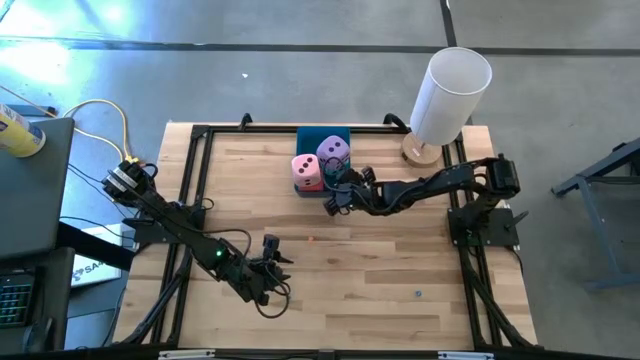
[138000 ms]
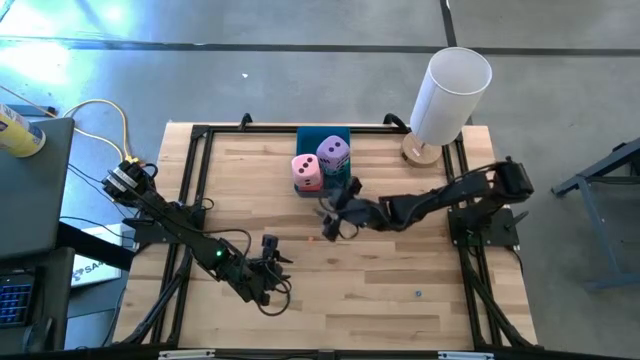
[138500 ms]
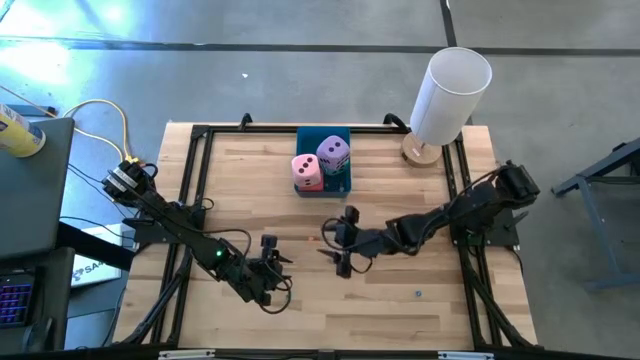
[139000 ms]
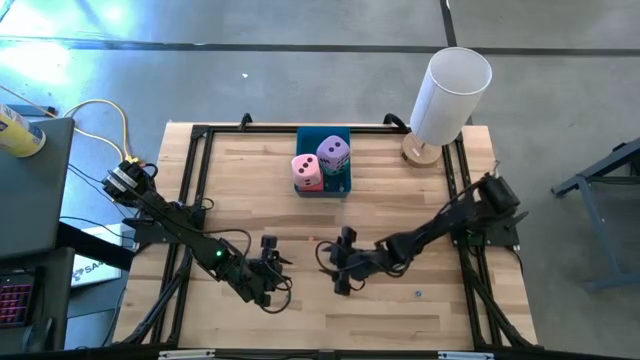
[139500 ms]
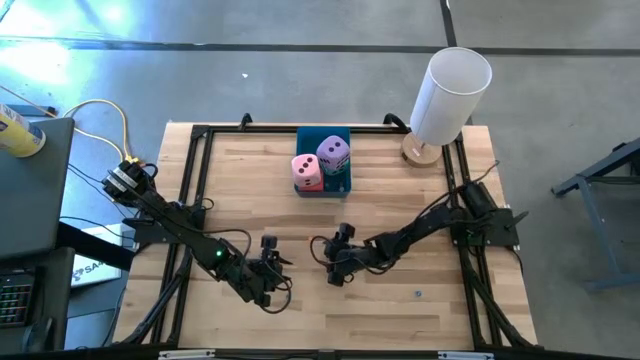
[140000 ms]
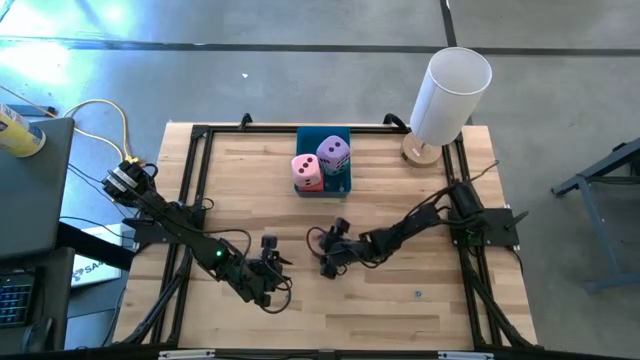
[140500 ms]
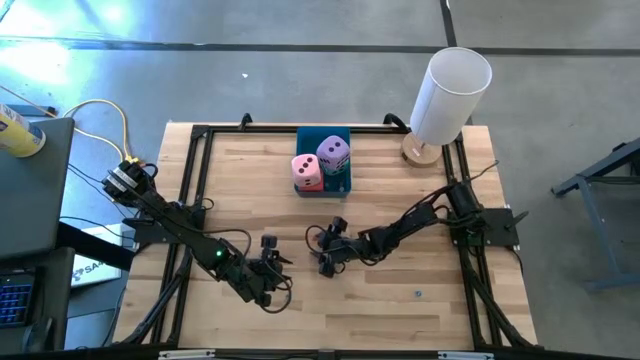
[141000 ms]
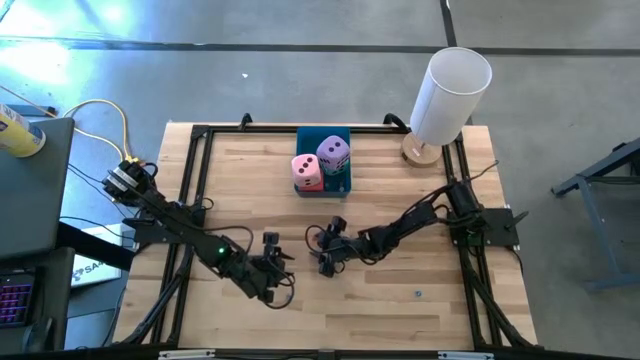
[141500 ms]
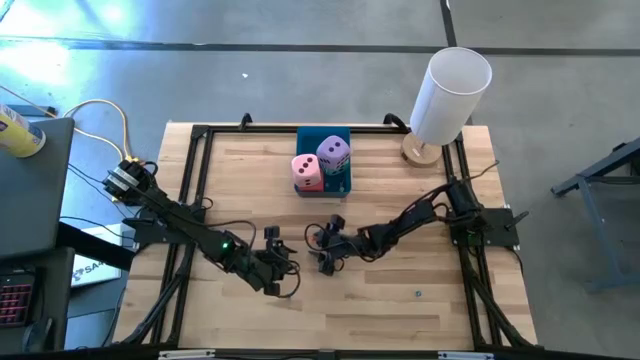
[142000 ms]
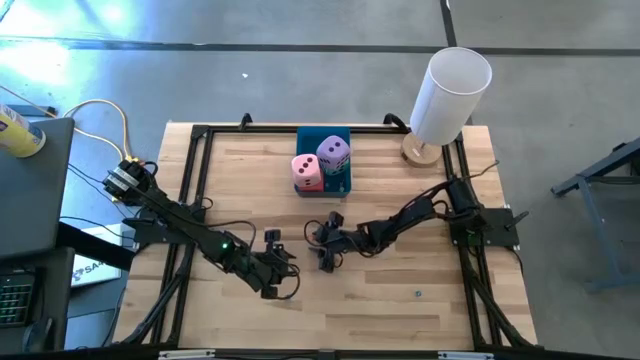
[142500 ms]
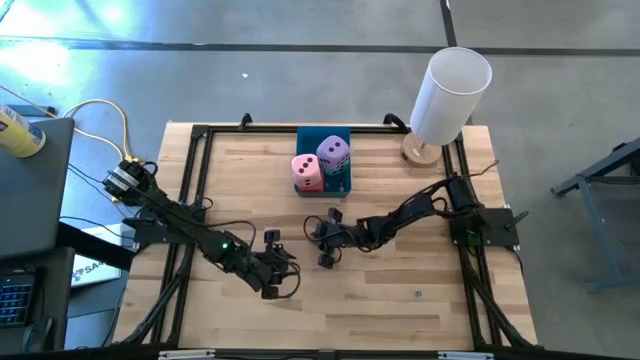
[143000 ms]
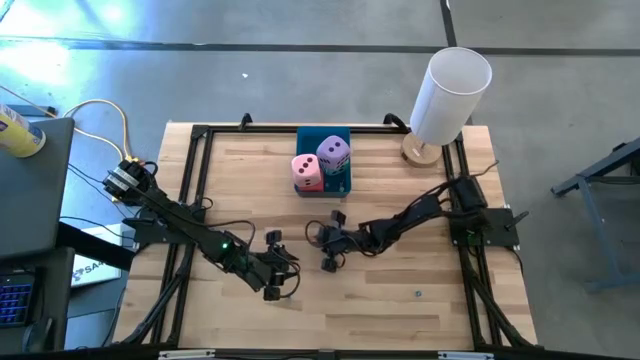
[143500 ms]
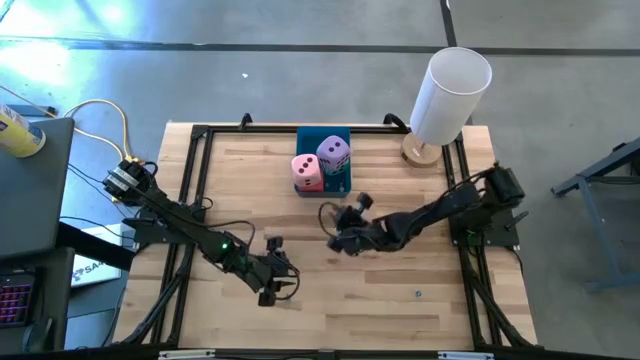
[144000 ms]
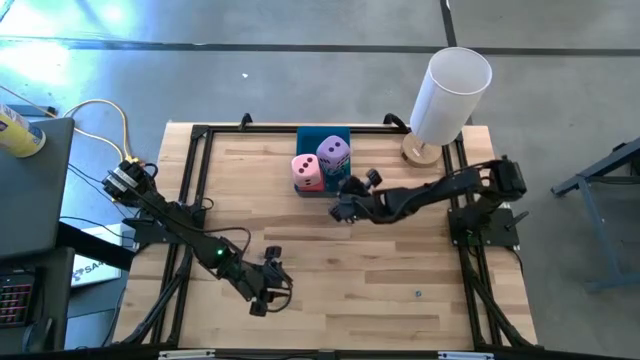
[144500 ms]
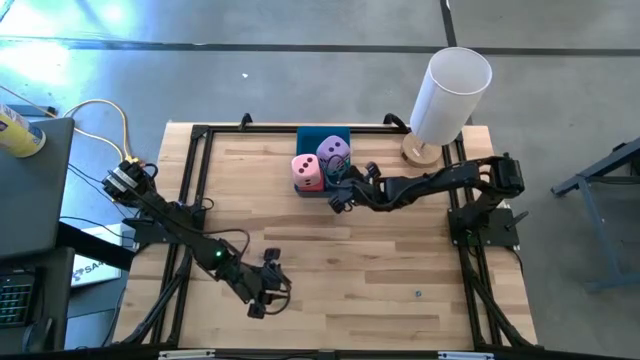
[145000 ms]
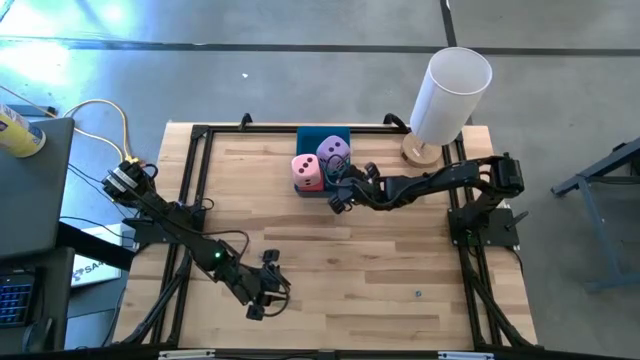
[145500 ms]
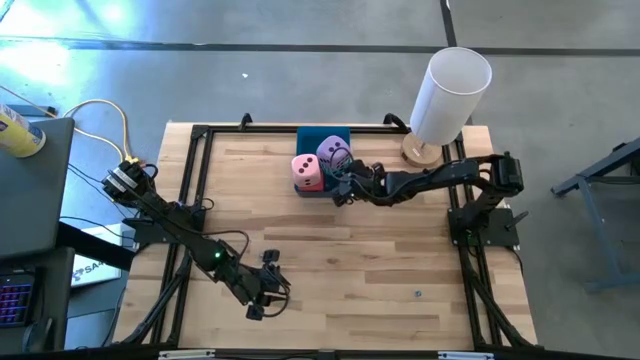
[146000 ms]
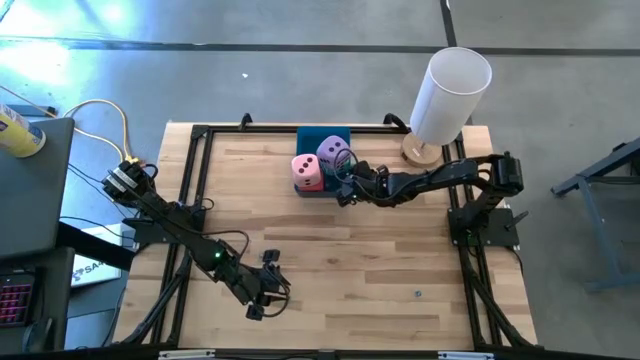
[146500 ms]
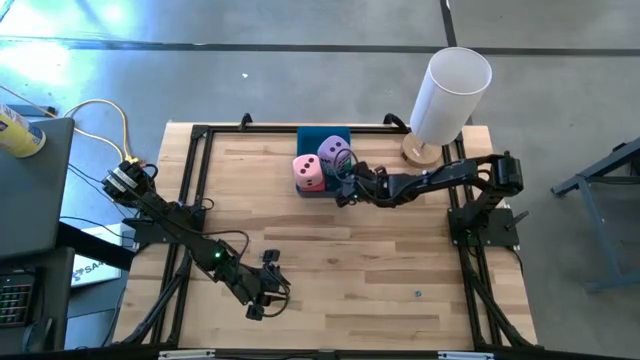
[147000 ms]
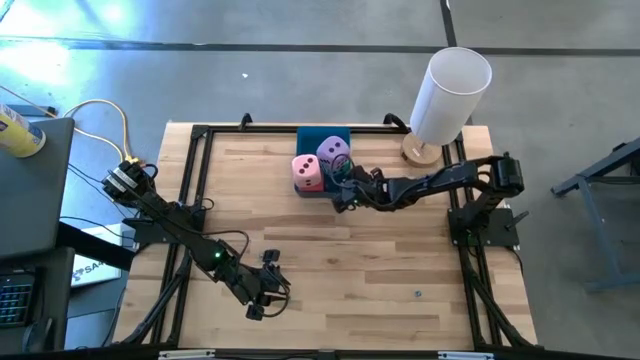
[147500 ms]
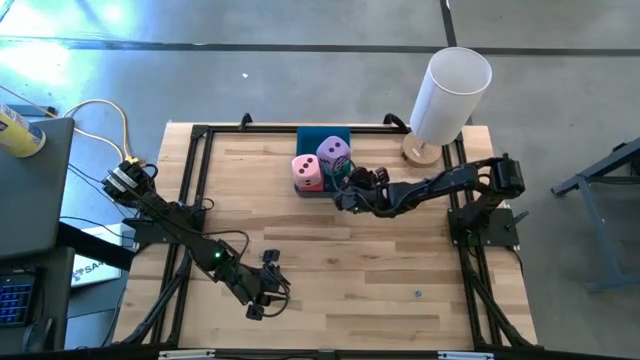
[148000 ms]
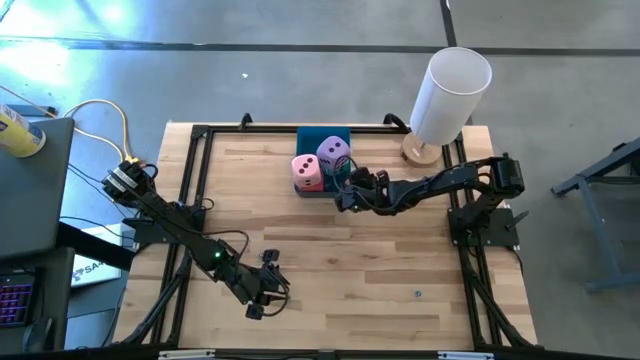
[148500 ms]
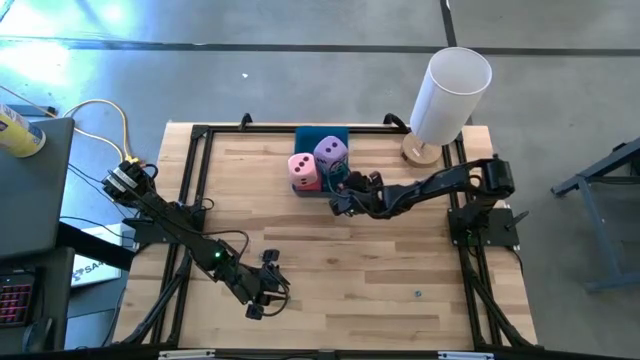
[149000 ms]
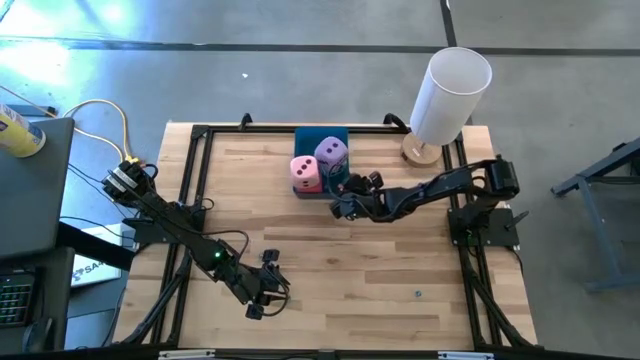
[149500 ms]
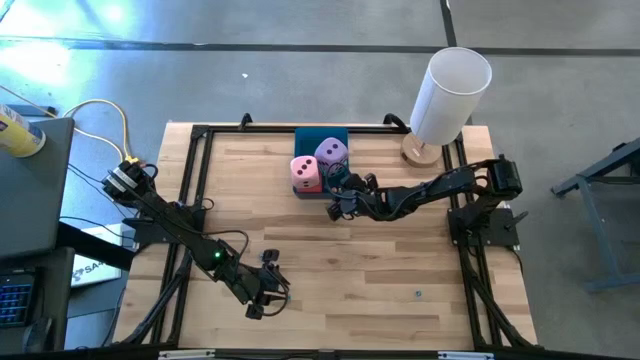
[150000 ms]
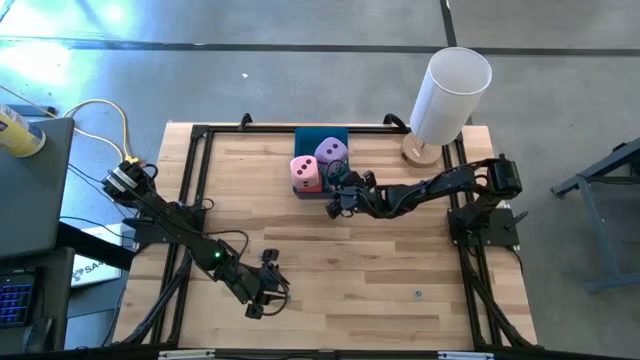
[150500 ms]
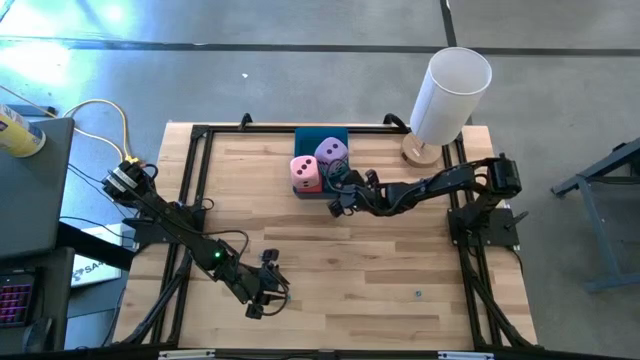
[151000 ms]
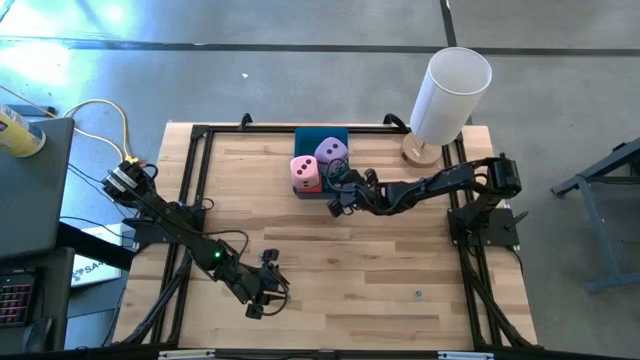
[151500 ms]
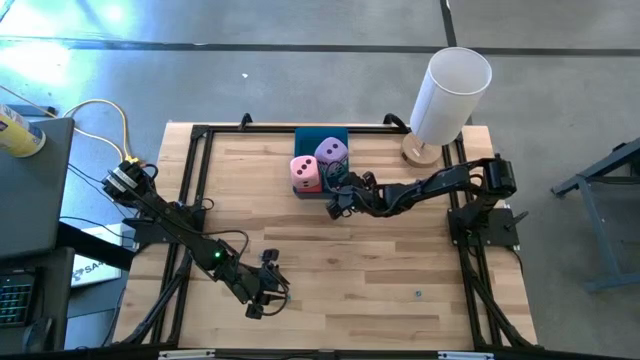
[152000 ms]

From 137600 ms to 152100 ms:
Task: Pick & Place Dice
Put the orange die into the blue bin

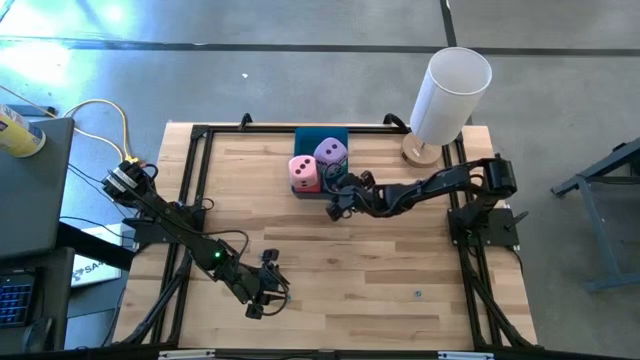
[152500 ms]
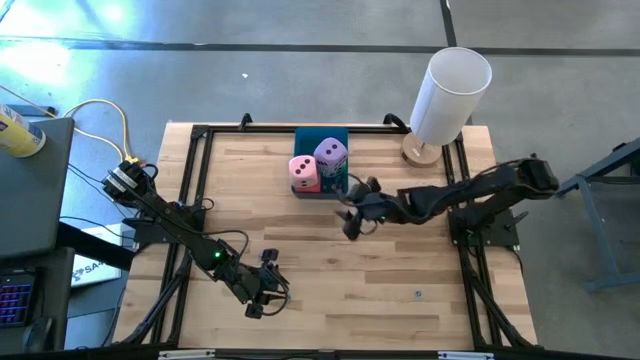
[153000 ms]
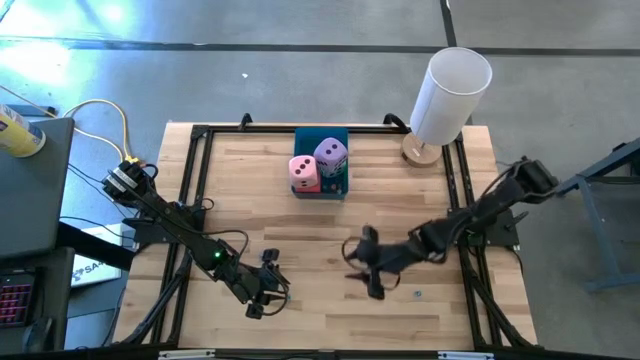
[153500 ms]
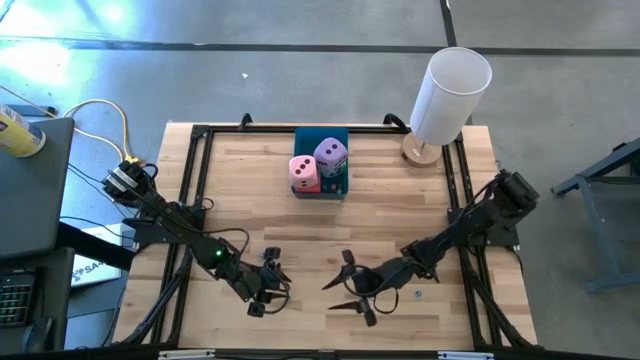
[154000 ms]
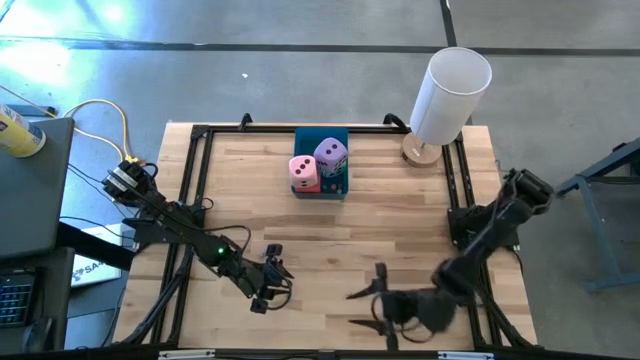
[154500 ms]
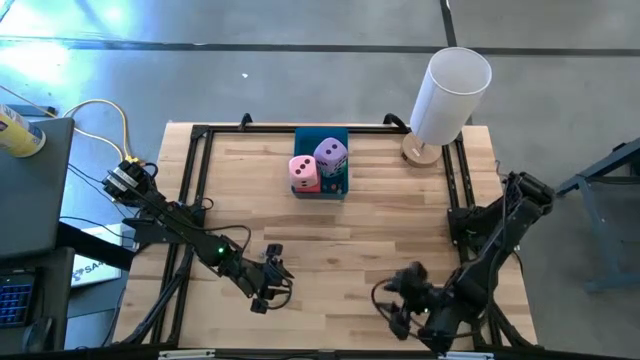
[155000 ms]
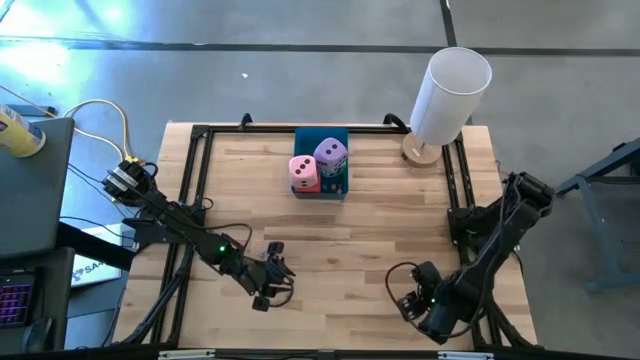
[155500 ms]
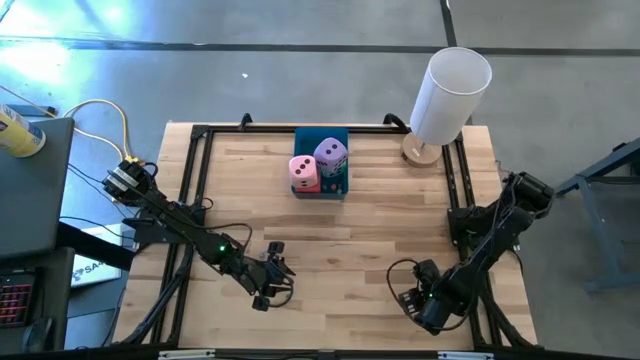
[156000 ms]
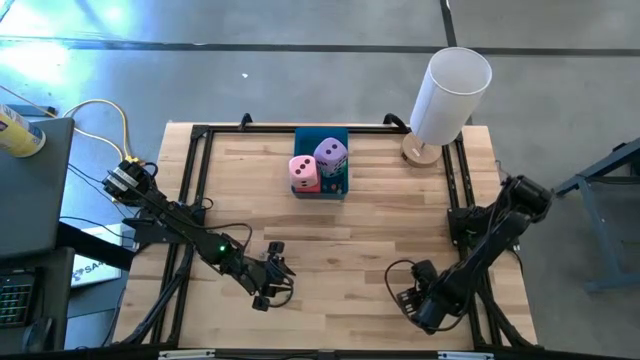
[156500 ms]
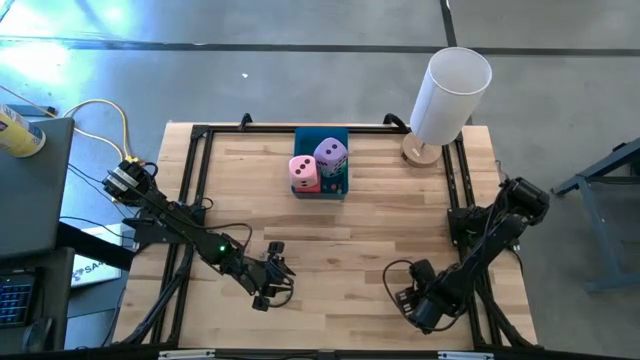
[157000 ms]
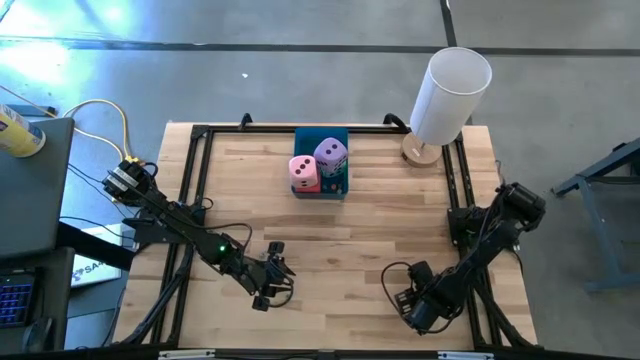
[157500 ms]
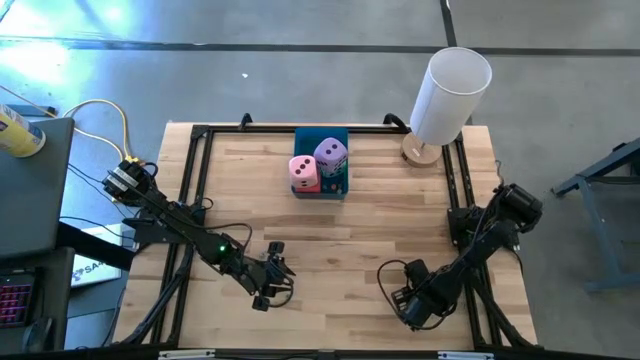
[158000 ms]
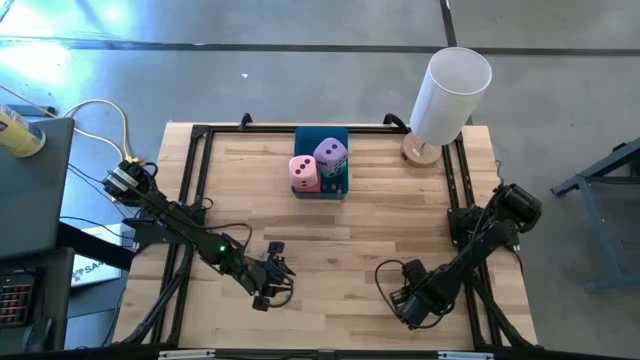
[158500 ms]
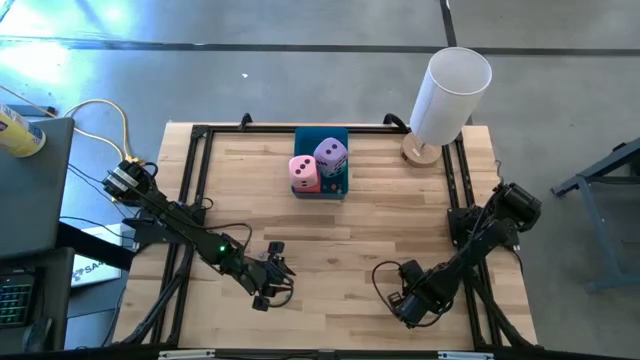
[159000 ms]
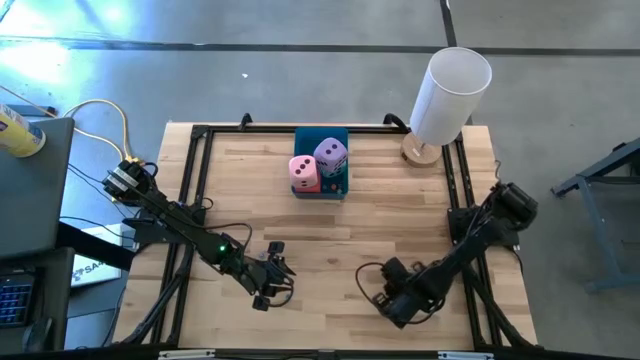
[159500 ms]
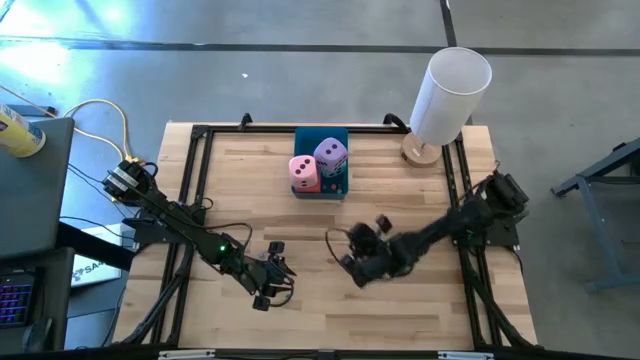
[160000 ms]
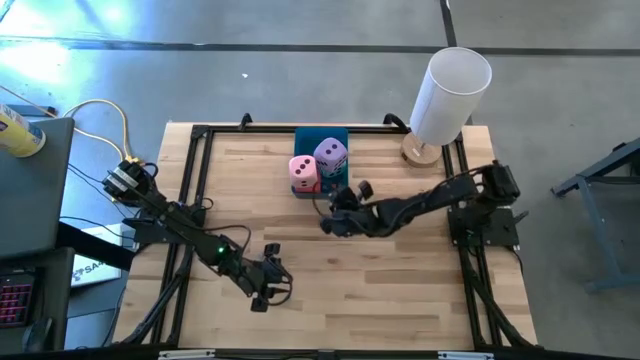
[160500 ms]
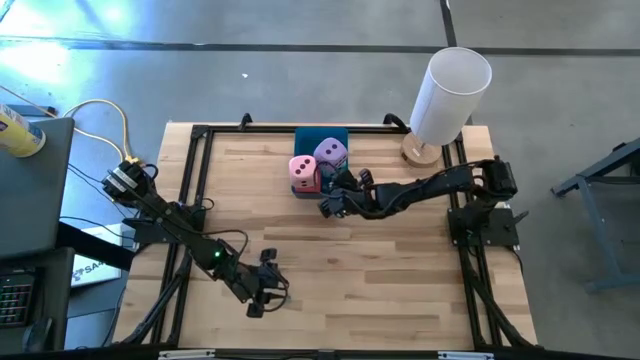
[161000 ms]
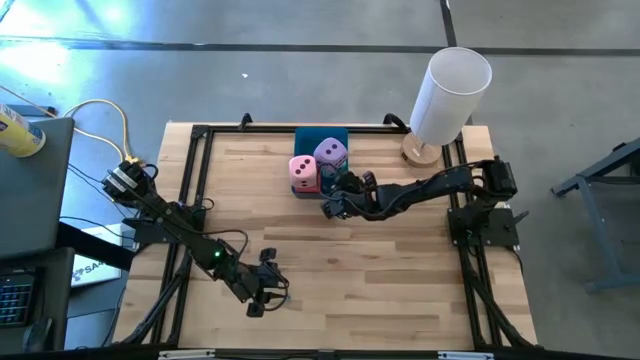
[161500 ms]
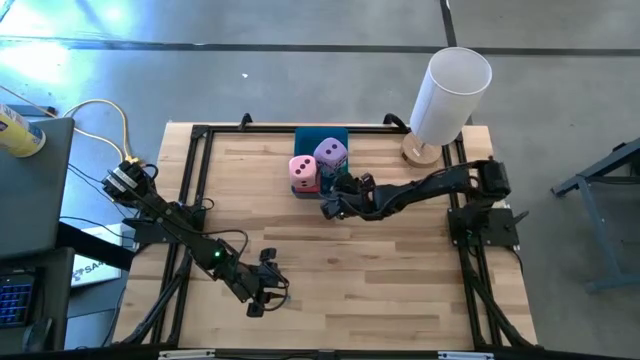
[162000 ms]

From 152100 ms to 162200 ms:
Put the right small light blue die into the blue bin
